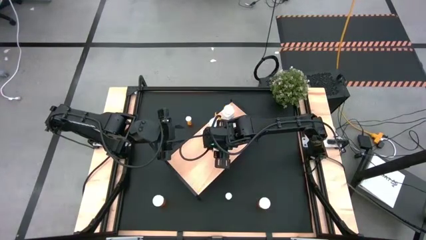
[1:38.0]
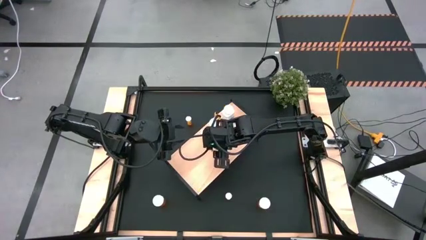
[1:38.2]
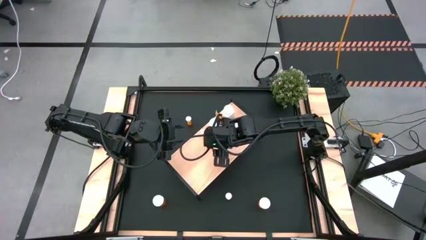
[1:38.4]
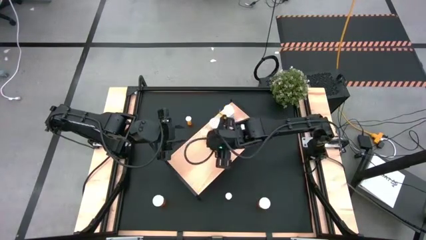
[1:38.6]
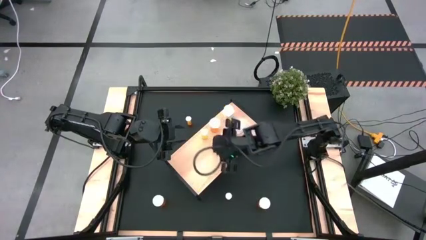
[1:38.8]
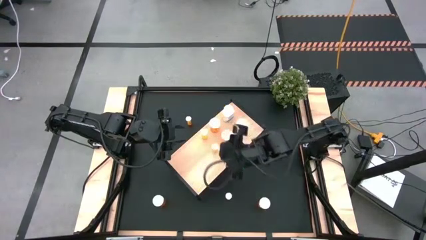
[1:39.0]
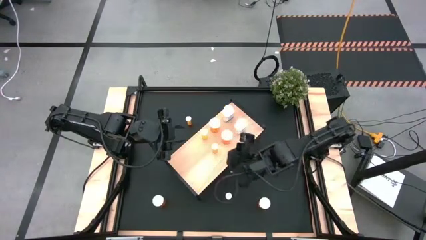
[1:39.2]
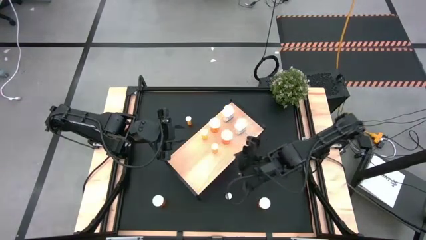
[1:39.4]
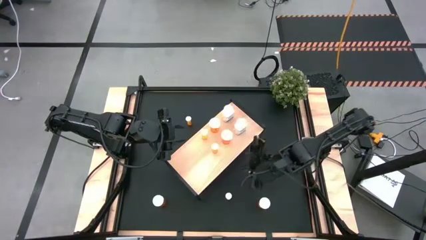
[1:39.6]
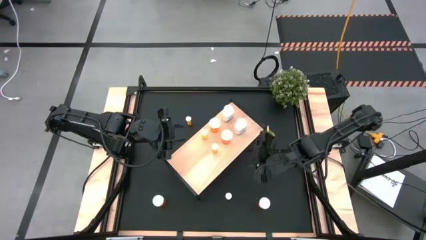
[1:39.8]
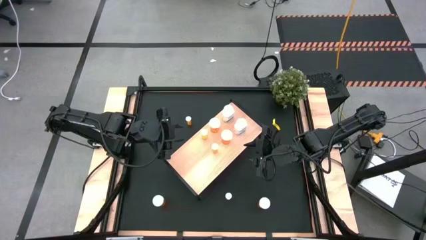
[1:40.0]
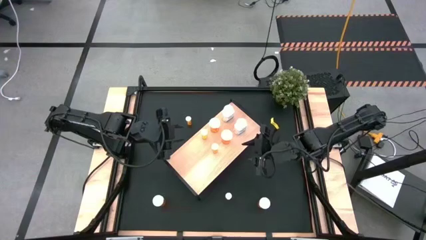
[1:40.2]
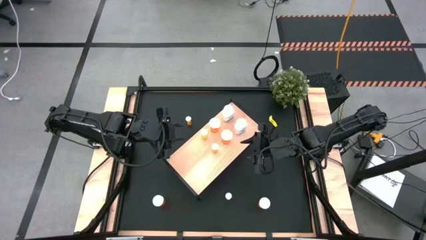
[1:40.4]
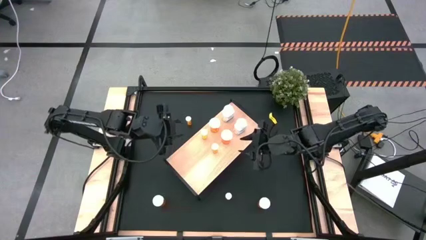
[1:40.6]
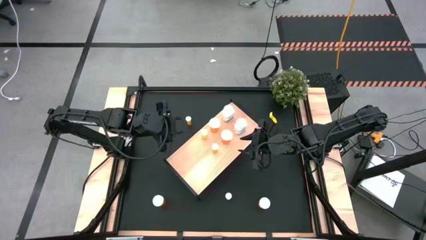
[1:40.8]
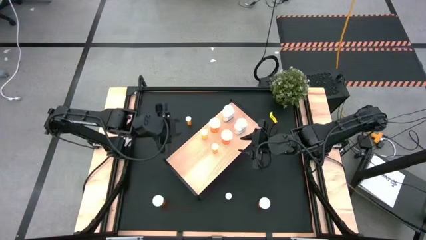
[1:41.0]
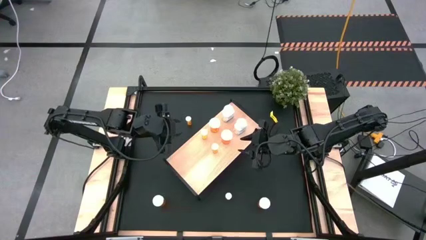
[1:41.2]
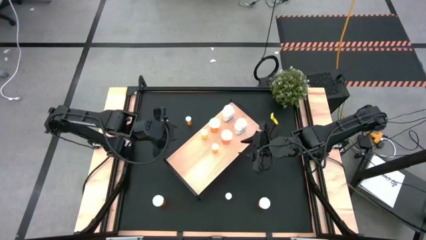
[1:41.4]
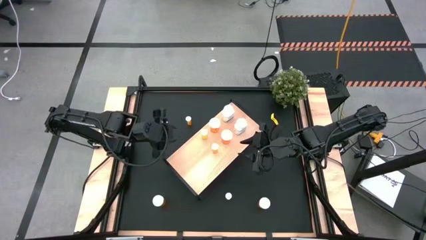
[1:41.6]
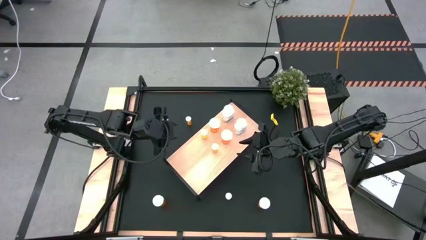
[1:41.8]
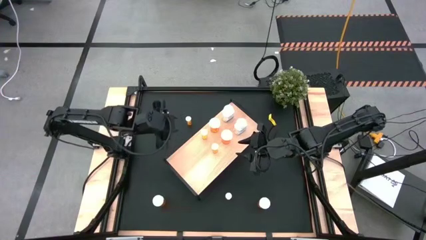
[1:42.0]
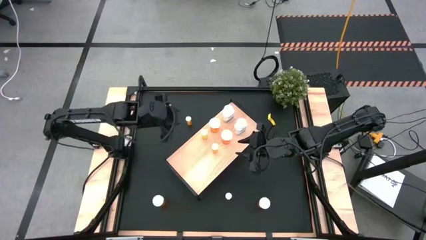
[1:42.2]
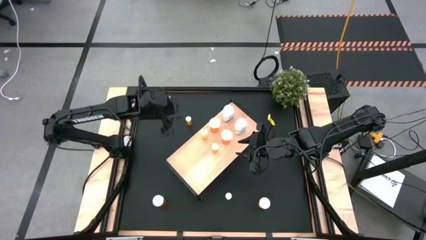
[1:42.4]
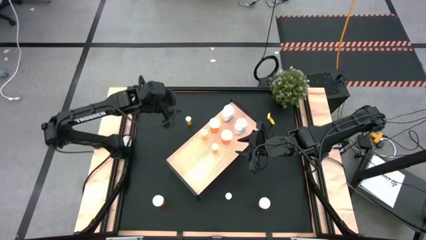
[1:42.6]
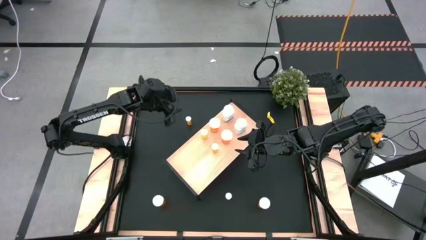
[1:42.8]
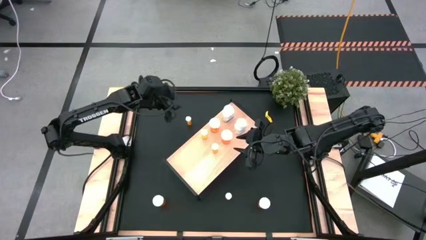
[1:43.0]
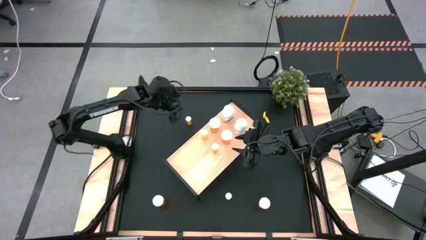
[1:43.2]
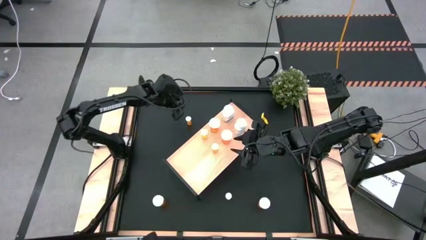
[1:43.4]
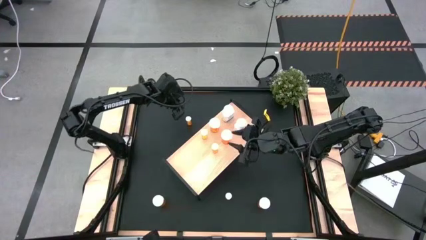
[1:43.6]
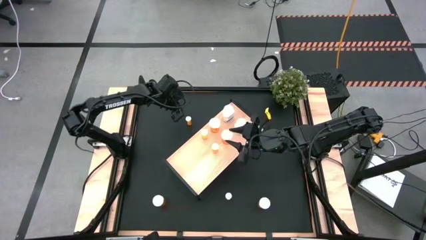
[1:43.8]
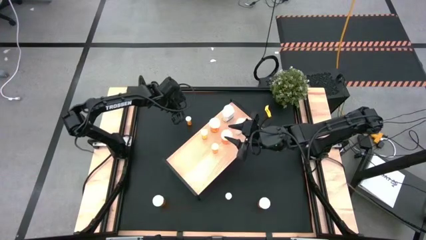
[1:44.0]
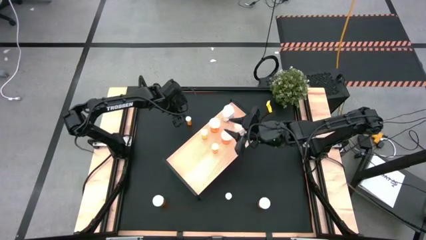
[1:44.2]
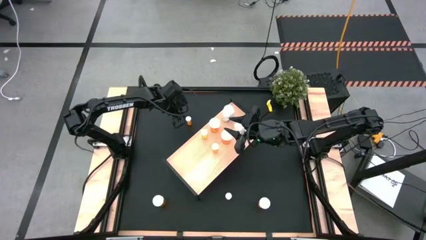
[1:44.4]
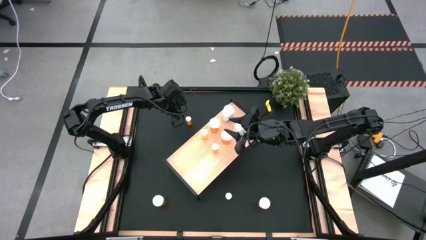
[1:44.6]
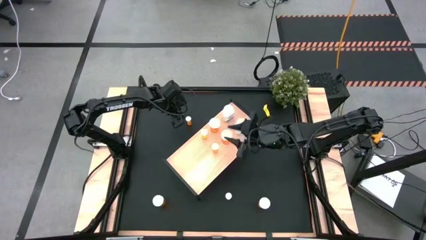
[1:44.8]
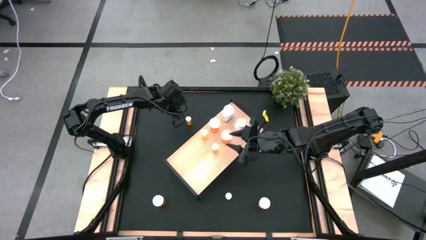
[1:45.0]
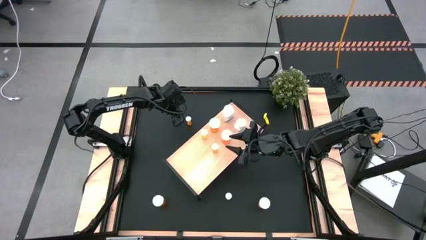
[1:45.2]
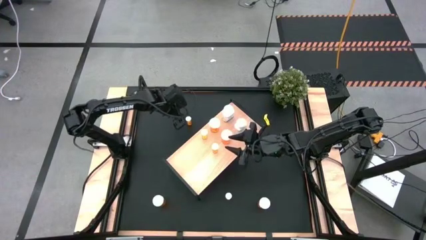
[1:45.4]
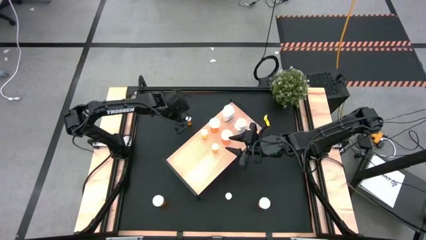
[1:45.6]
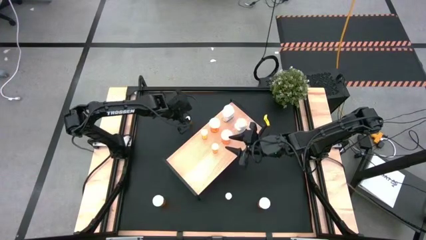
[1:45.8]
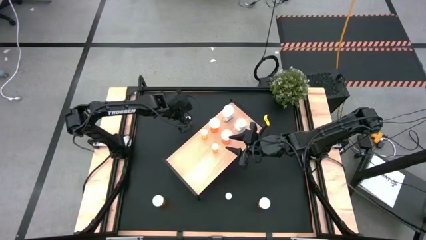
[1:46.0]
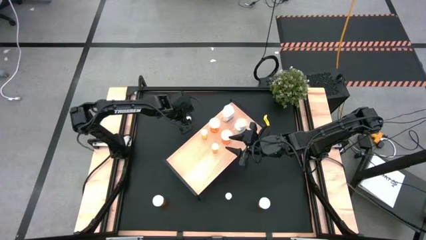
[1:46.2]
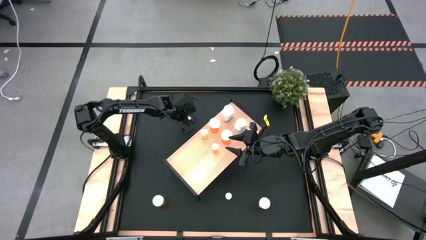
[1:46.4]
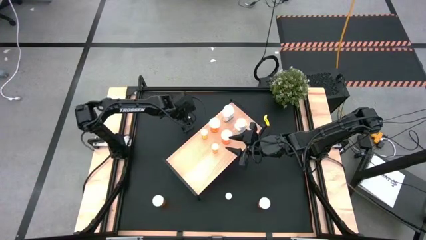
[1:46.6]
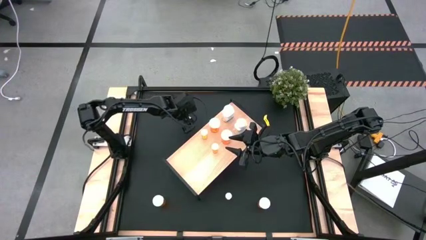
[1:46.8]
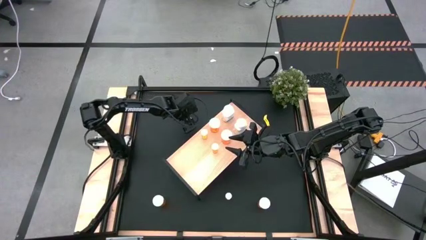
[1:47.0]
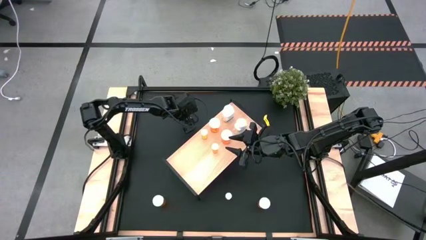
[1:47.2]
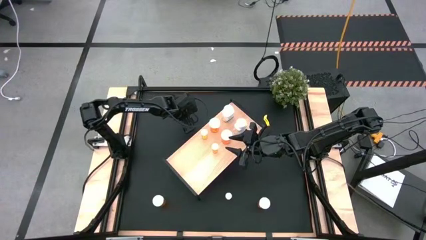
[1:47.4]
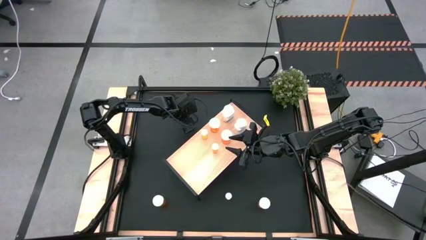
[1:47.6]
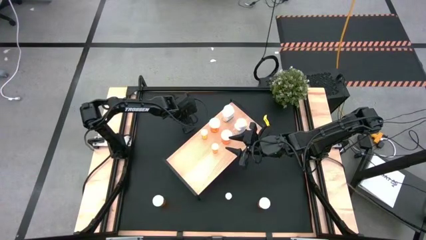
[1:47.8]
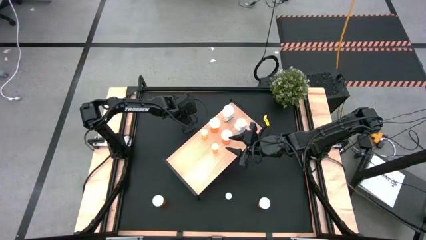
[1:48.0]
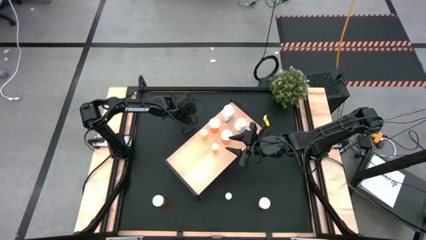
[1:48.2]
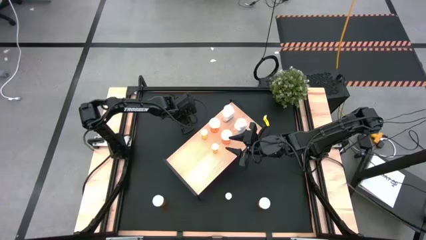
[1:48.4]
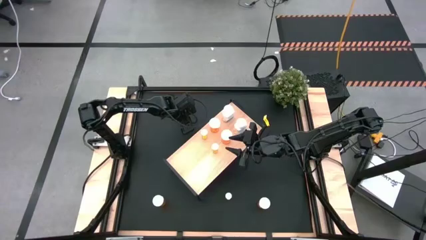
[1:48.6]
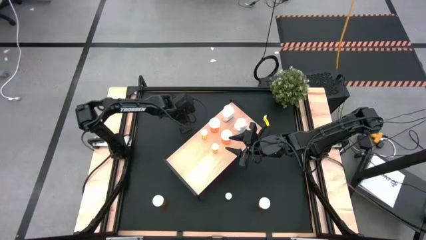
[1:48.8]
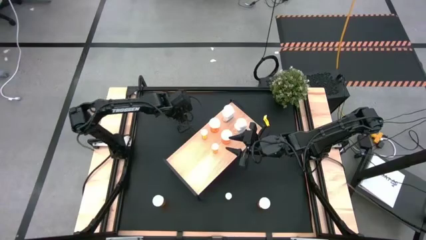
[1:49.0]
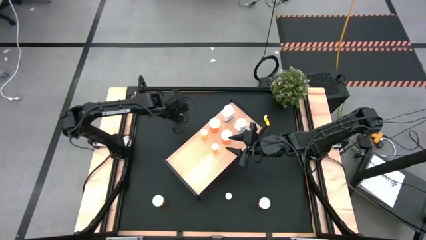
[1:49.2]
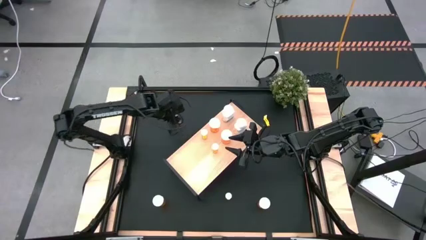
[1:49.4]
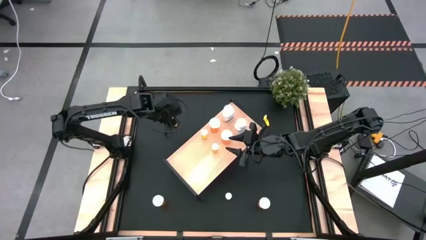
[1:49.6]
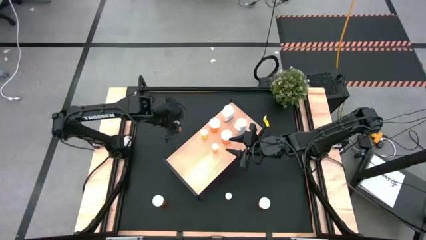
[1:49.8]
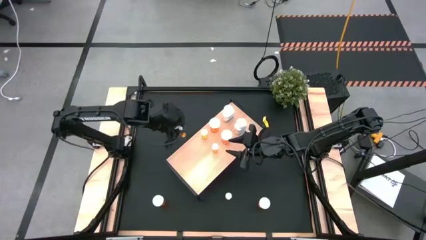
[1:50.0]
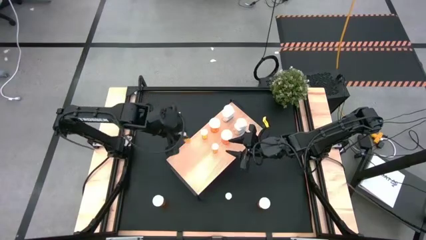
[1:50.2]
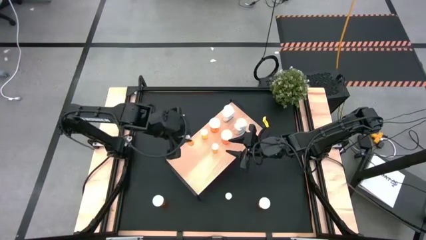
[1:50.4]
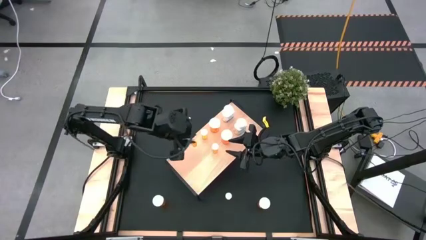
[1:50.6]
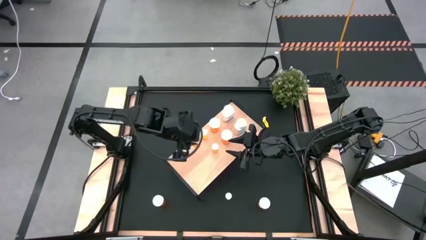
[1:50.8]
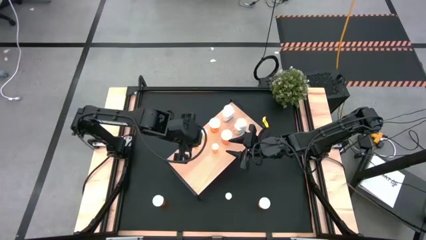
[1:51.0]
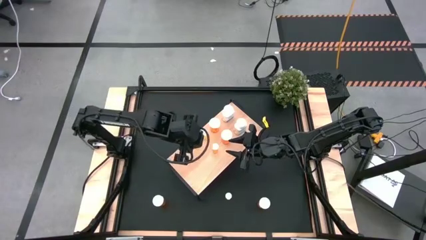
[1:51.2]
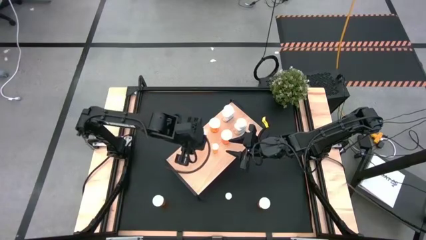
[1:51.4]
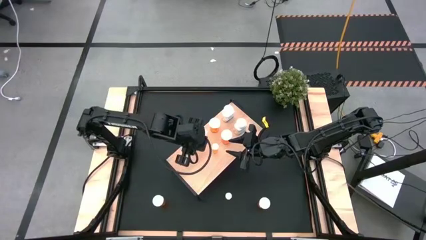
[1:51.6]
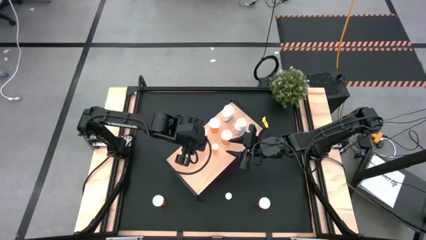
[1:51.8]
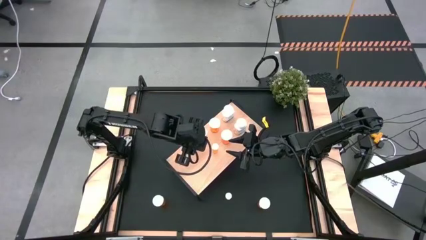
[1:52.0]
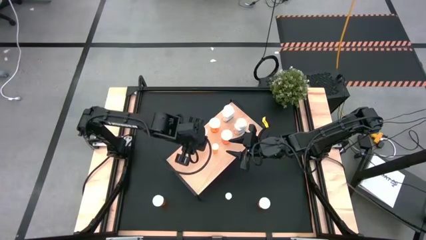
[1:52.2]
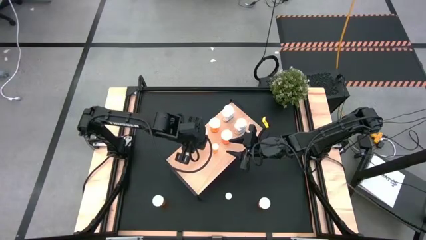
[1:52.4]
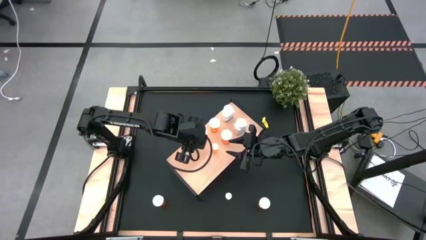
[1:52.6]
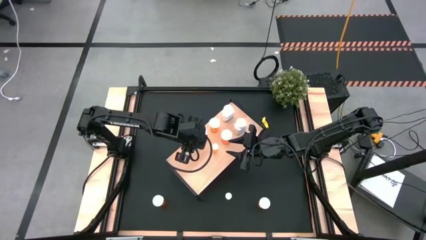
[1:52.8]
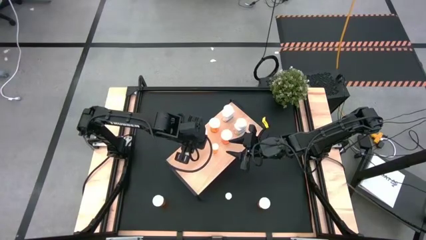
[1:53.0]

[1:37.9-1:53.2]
Task: Pick and place medicine bottles onto shelf by color
Put the small orange pill bottle on the shelf
